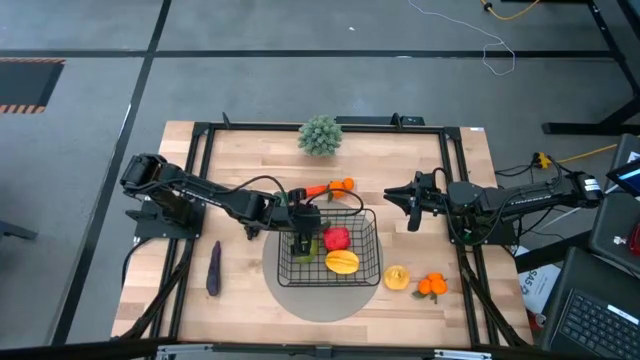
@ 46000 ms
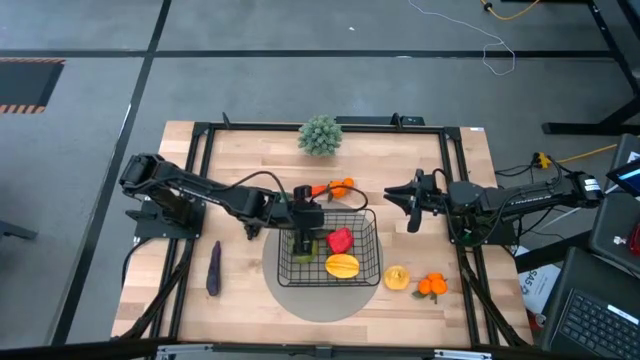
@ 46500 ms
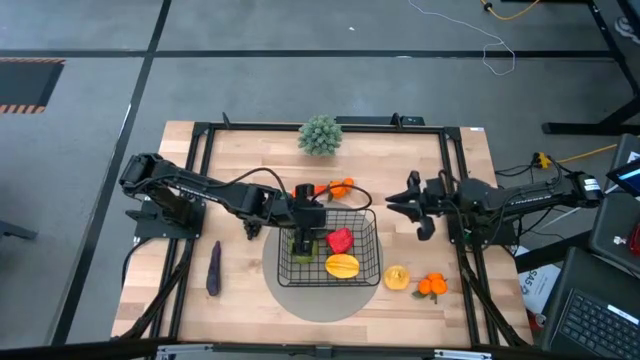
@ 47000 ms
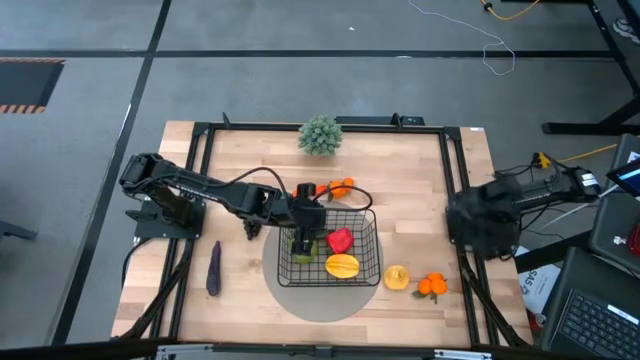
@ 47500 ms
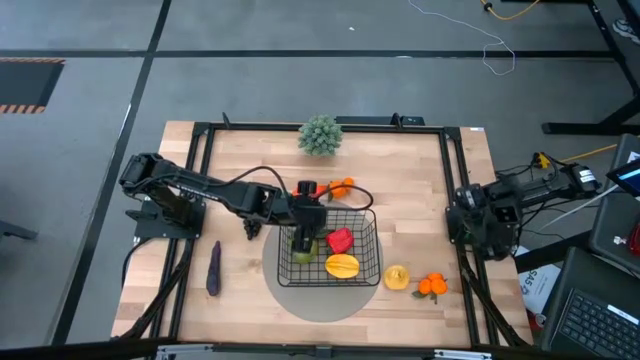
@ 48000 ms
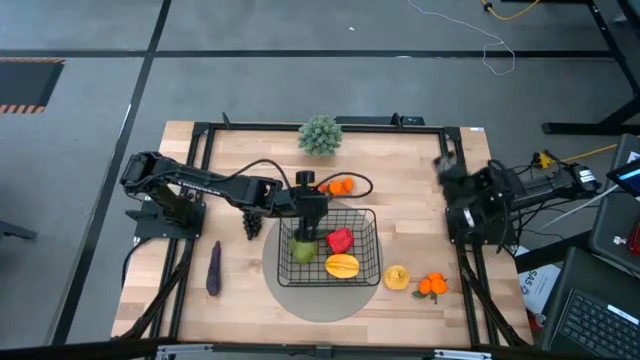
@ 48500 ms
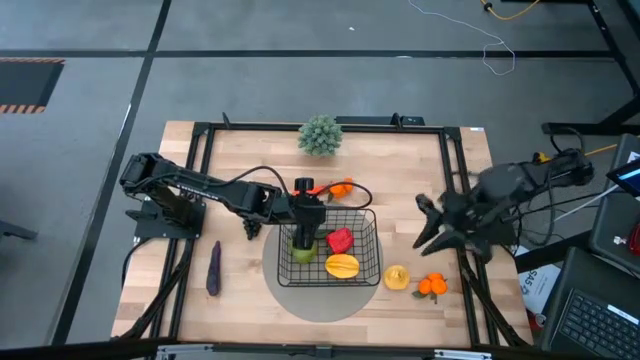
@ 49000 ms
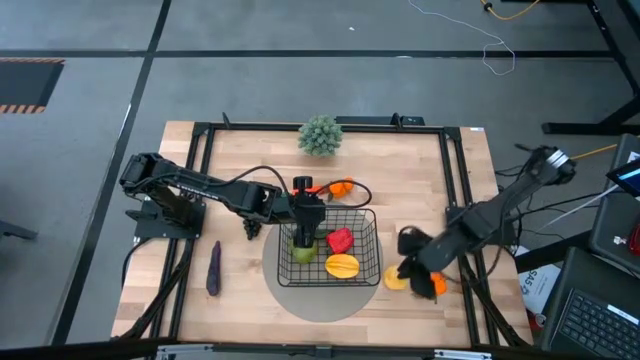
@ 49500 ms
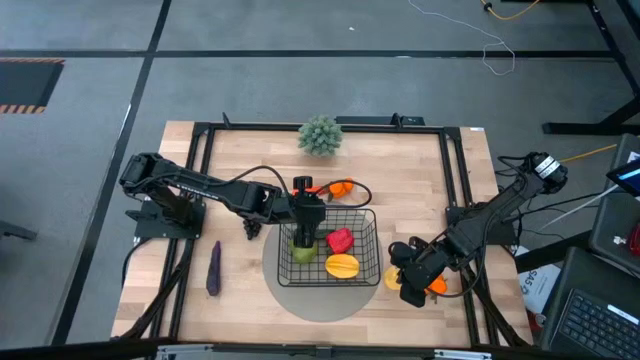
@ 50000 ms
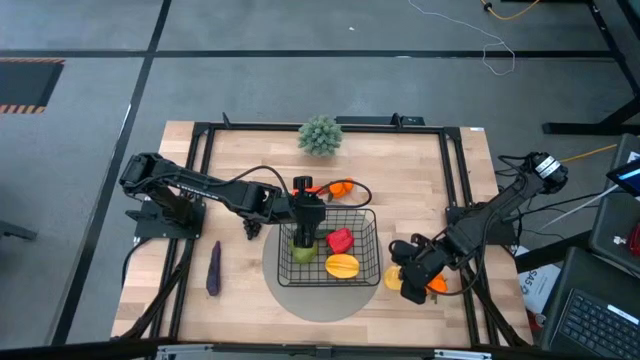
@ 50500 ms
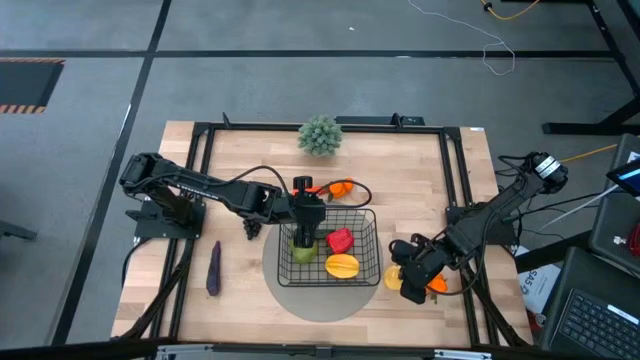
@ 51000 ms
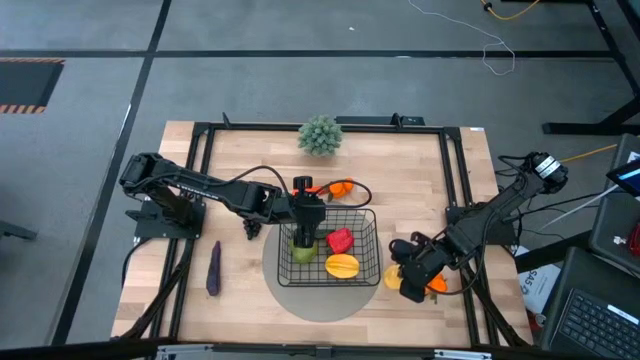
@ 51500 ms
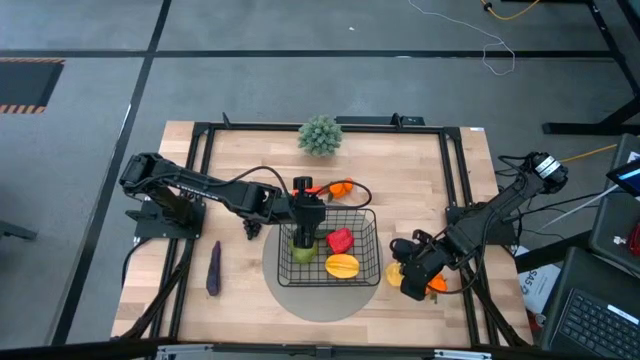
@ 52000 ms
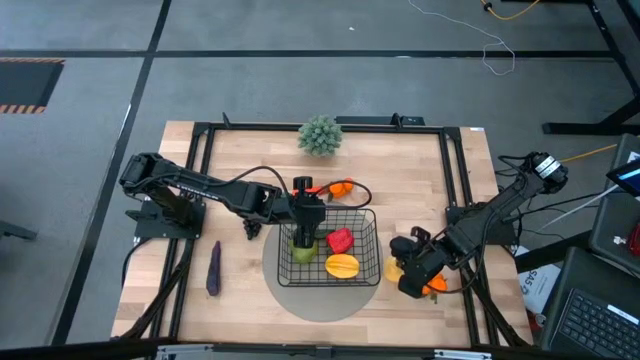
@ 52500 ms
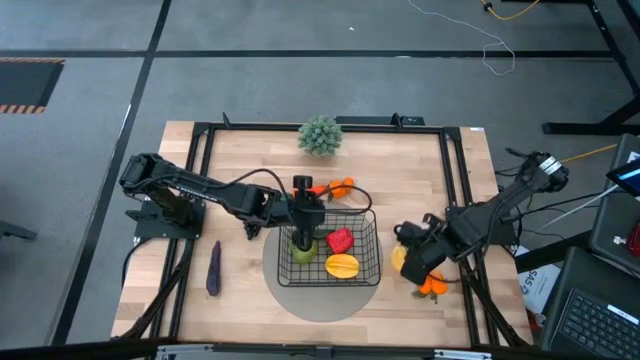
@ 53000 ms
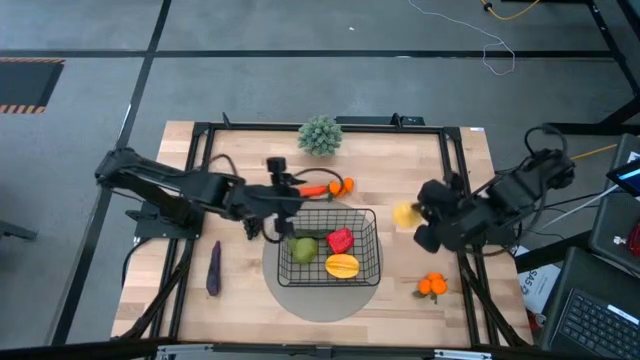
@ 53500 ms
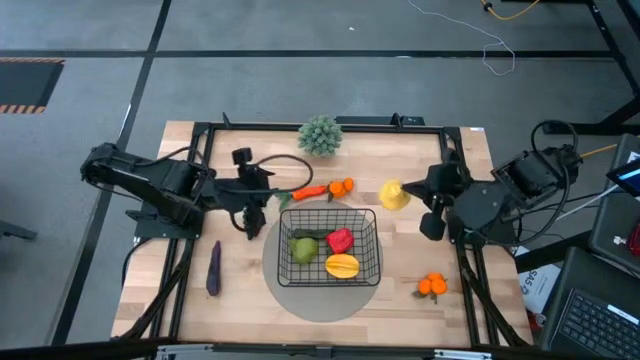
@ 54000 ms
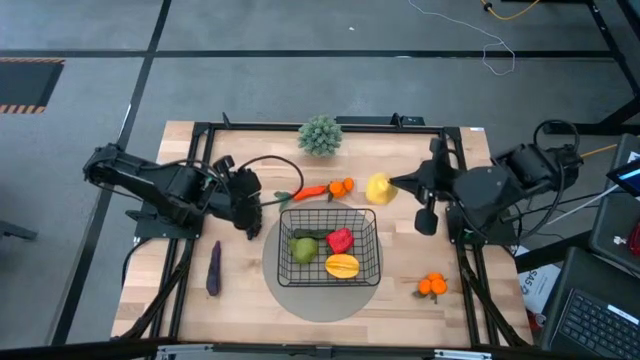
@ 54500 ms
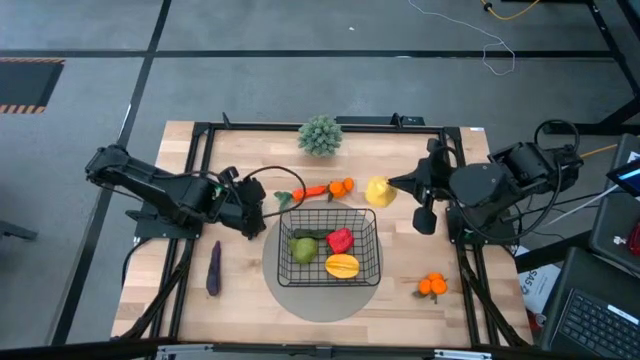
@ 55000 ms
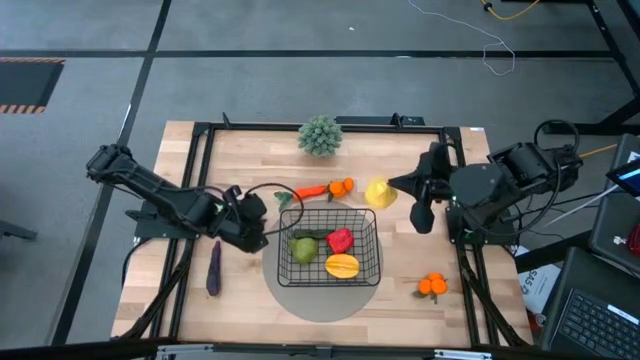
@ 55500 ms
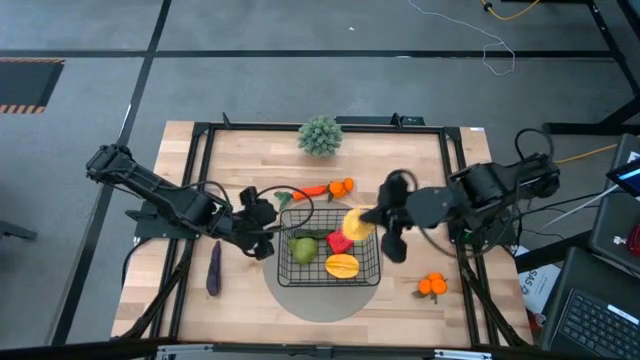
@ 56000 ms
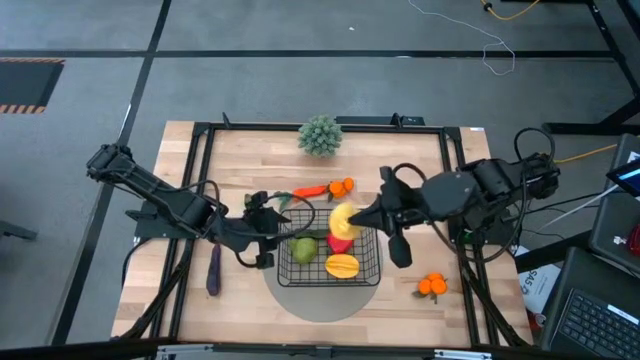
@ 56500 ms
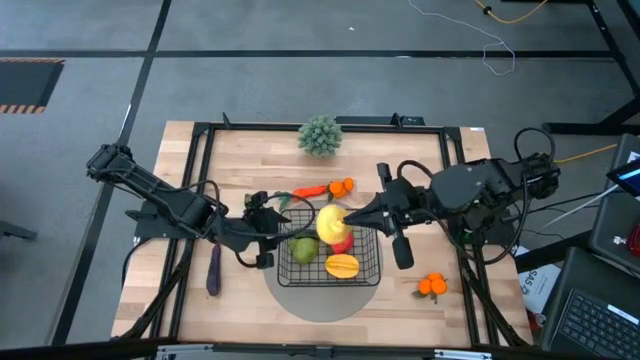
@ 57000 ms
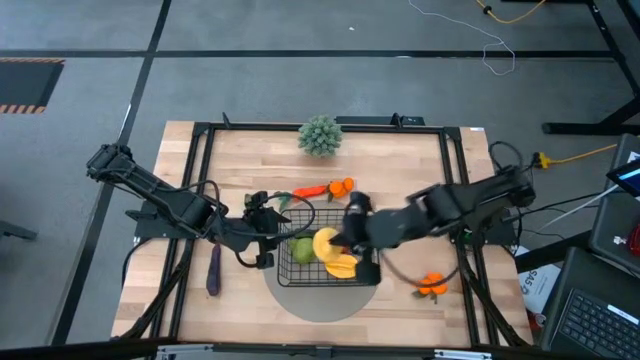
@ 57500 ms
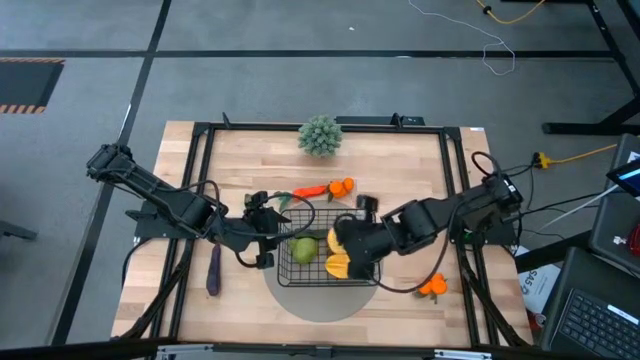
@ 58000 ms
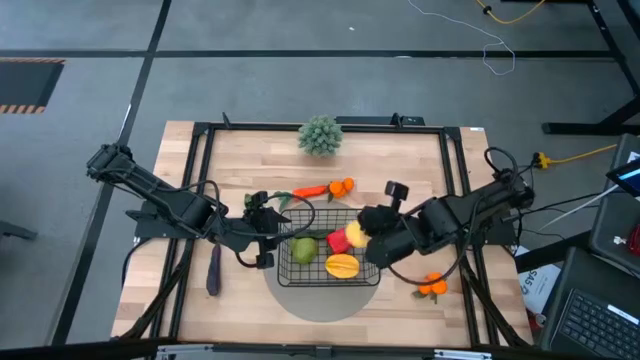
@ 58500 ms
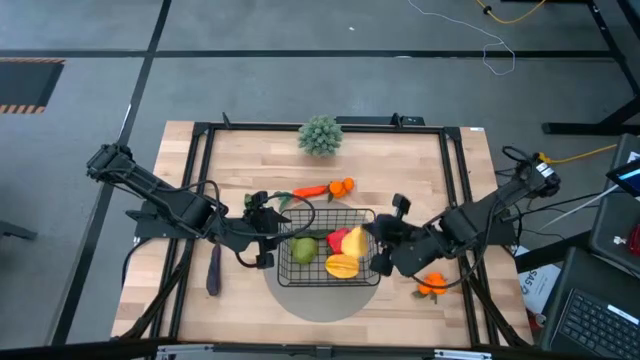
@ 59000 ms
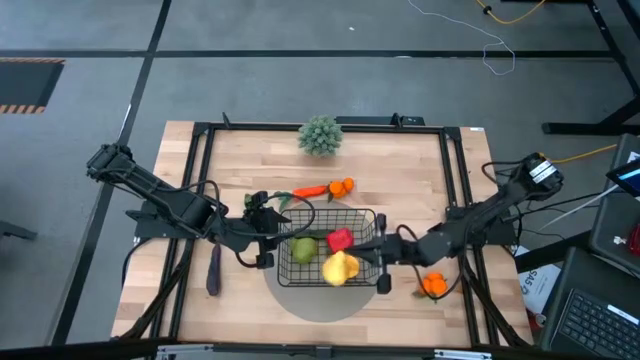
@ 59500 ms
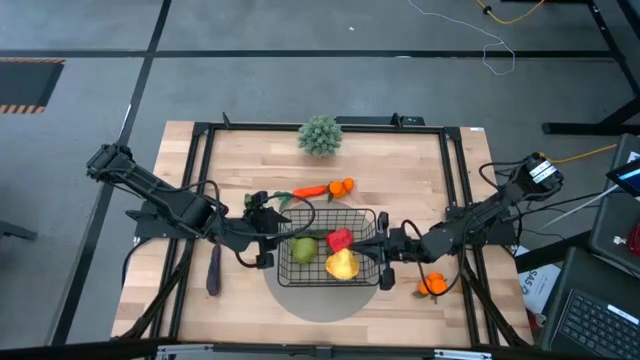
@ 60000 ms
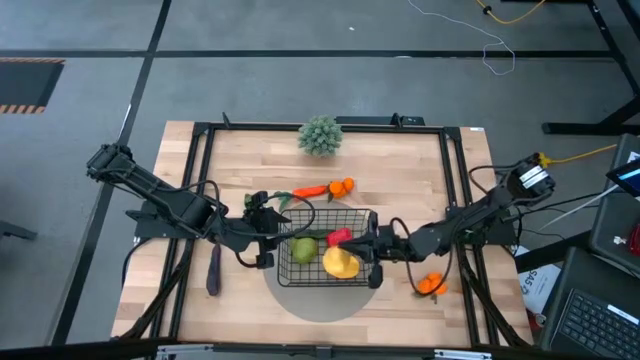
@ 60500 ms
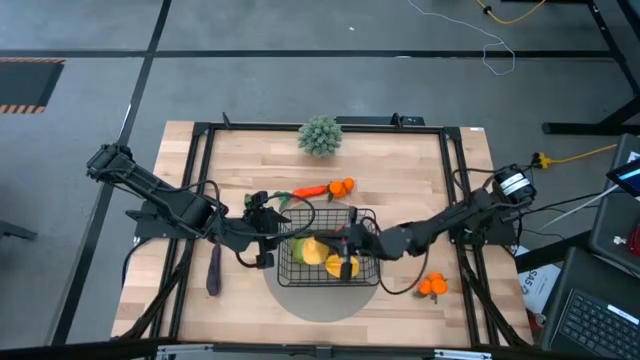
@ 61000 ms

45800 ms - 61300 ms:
Task: Build produce basket
Put the yellow pear into the black wire basket

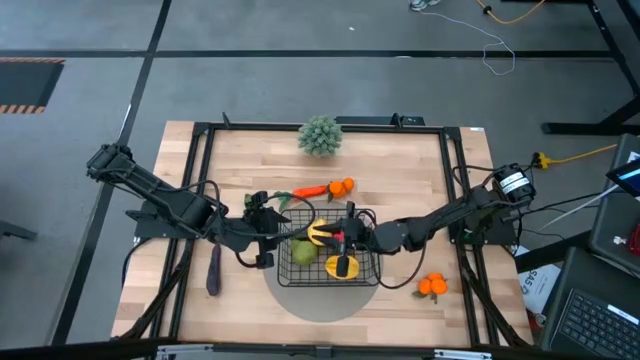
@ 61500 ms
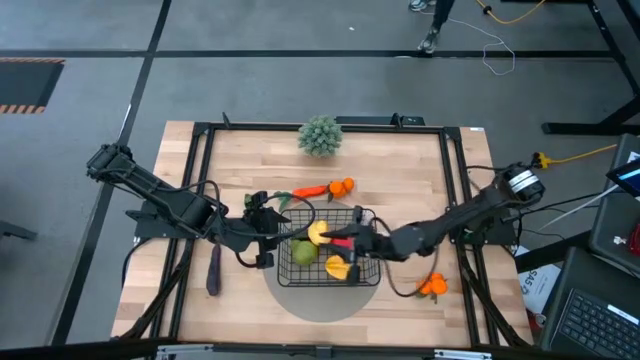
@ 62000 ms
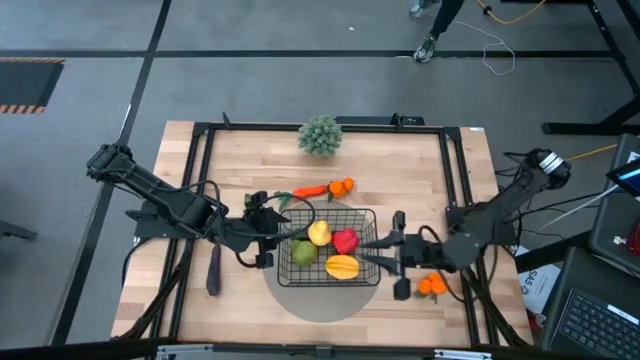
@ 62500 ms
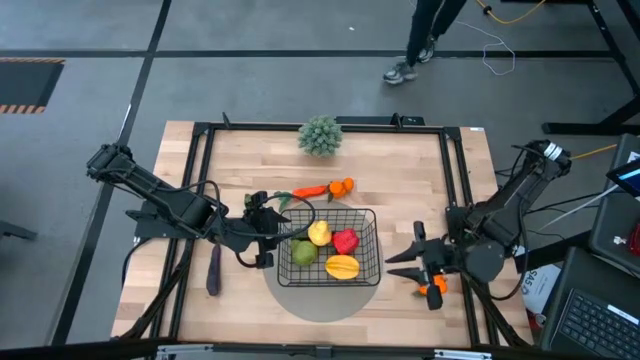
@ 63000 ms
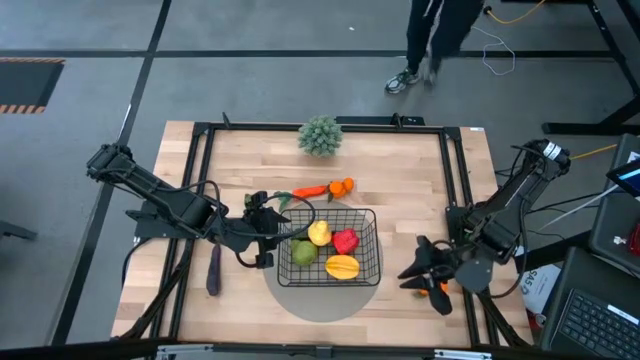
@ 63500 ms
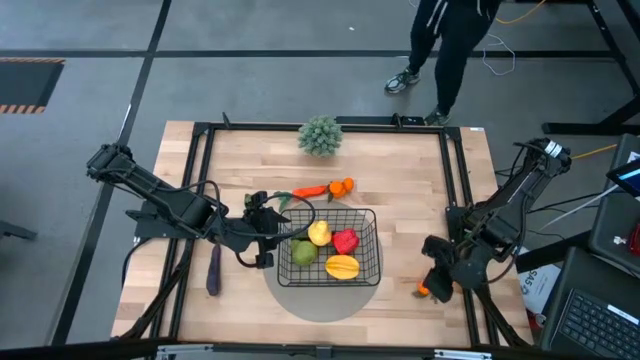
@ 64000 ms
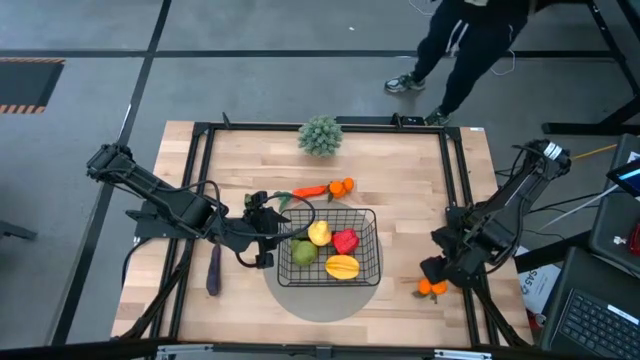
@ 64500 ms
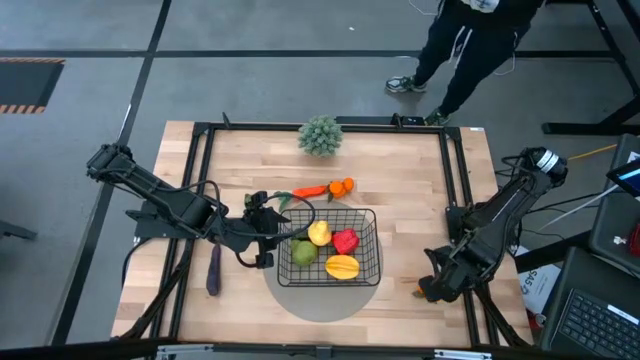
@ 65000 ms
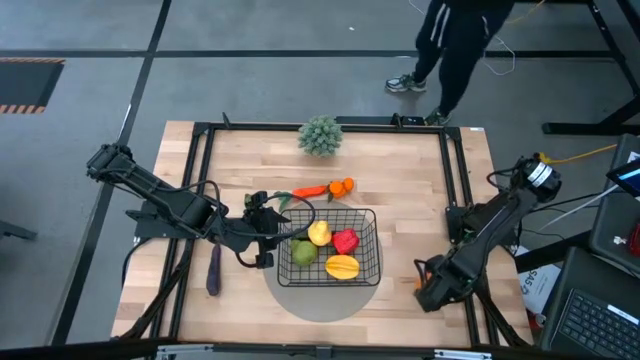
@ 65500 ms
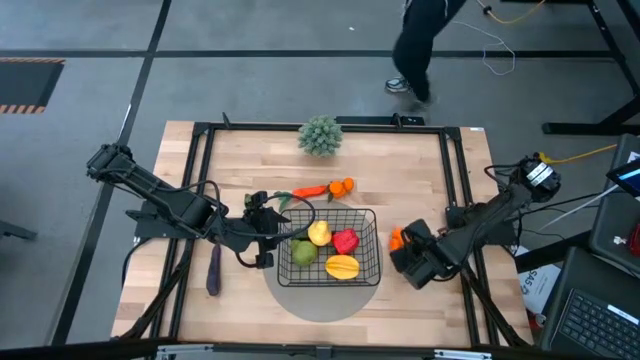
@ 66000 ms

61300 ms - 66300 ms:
Move the bottom tangerine to the right of the black wire basket
